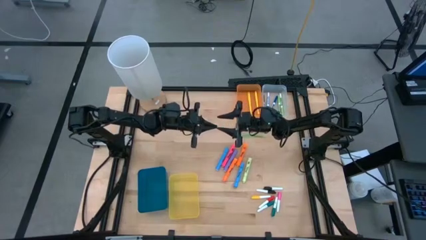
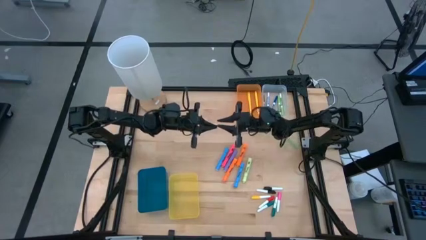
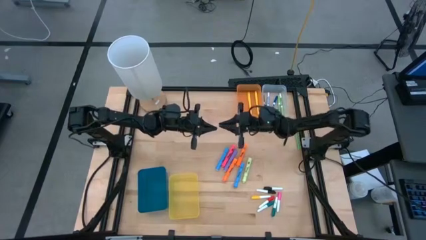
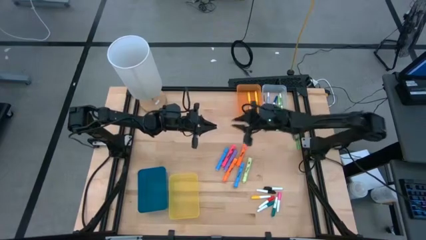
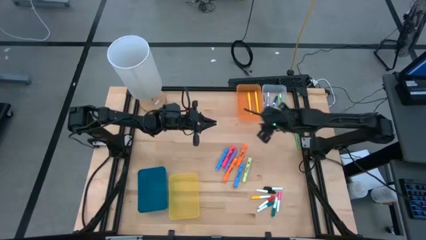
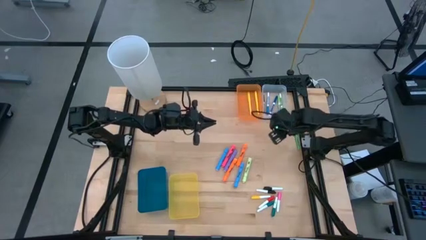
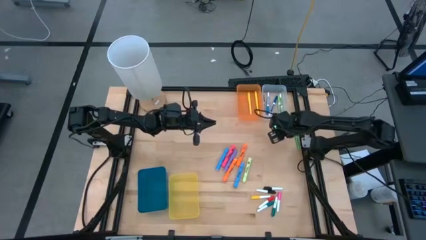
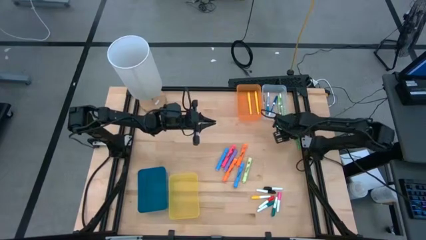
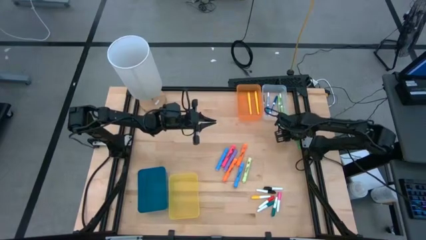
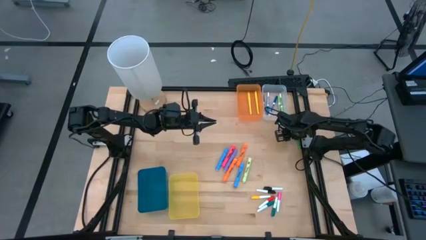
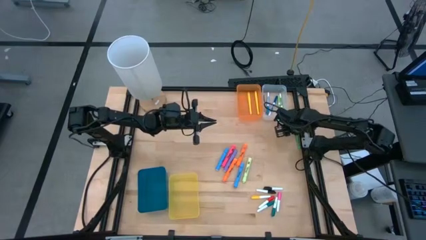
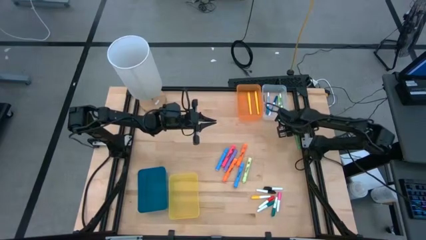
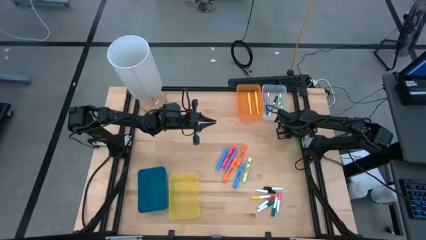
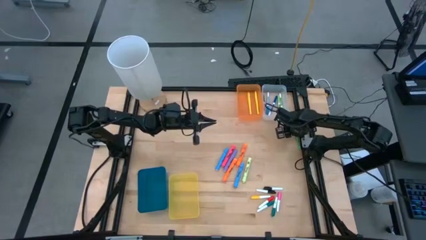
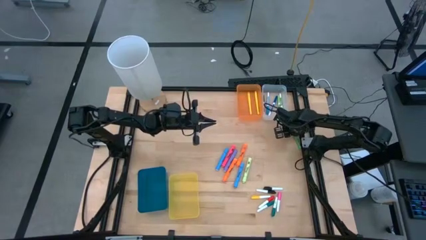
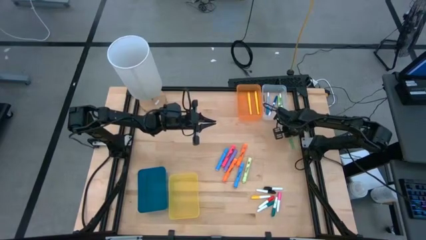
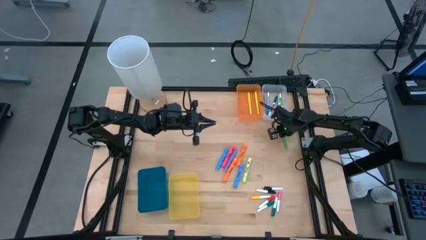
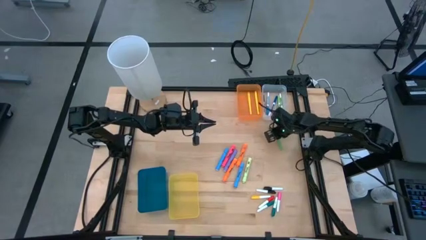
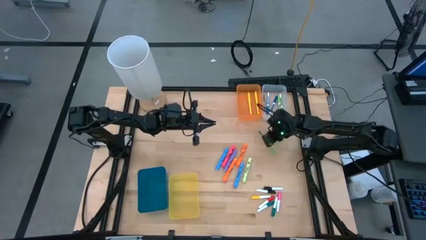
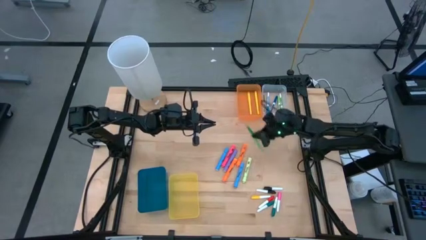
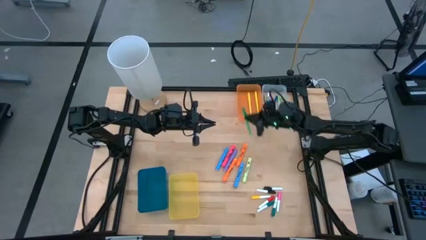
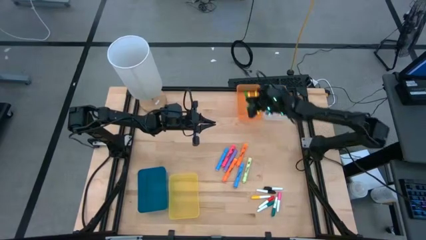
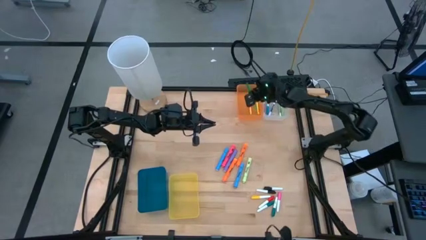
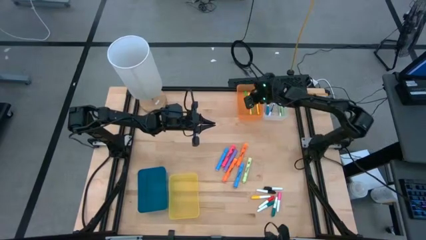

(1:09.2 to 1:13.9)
Task: Pick & Place Markers
Put the green pen into the orange bin

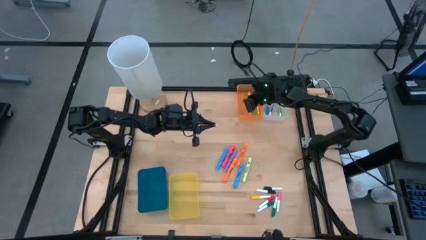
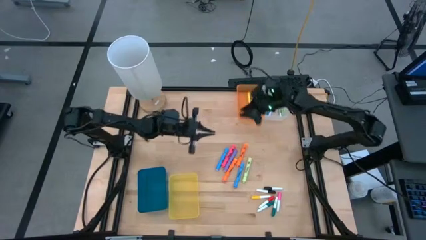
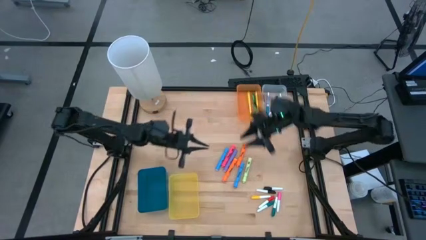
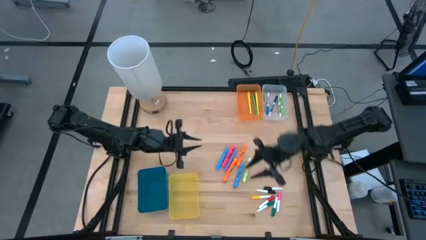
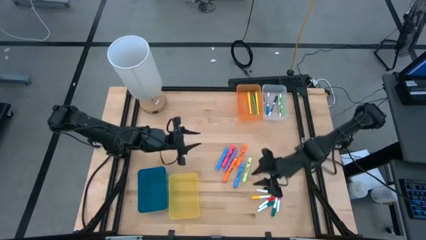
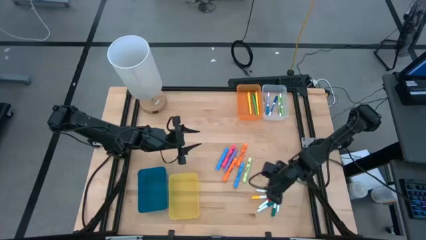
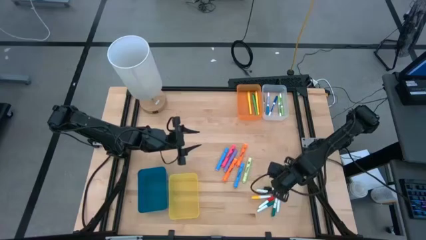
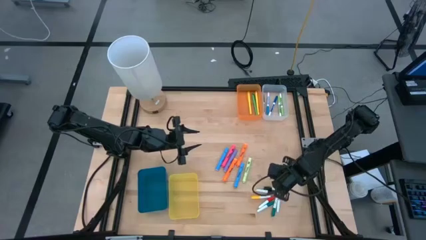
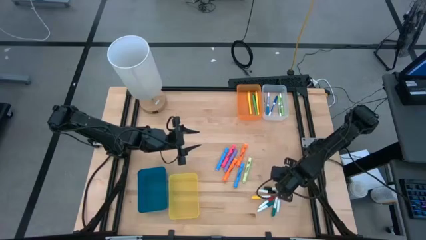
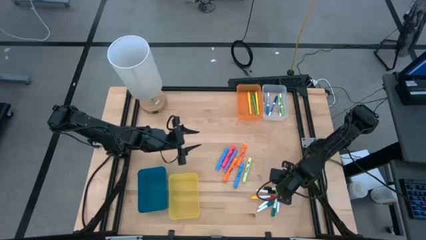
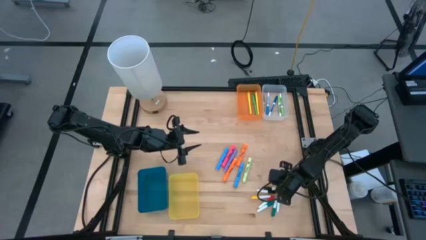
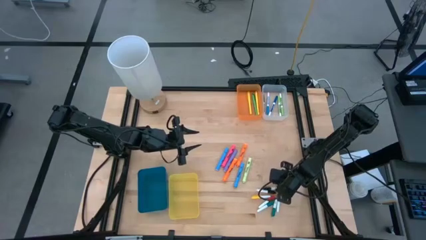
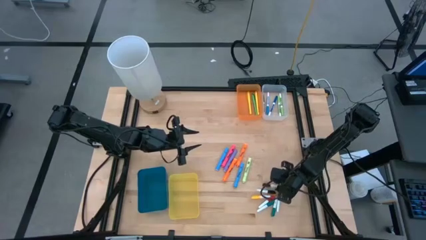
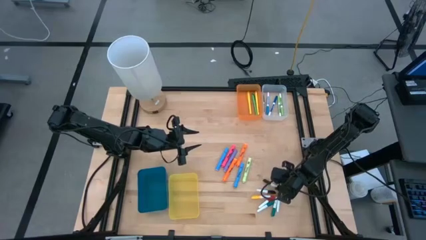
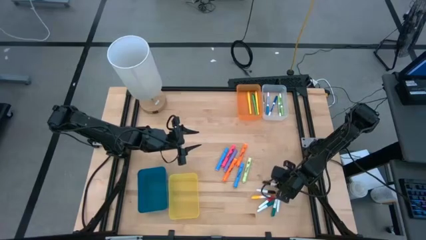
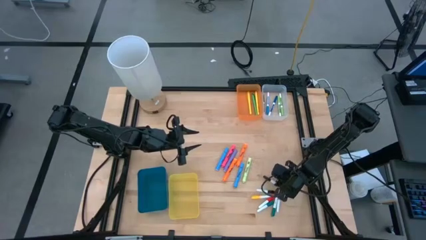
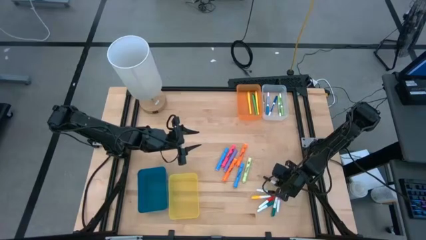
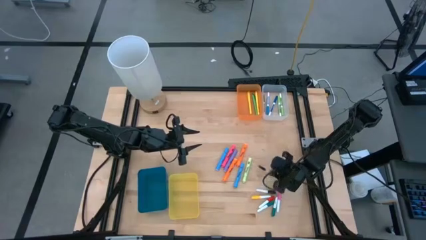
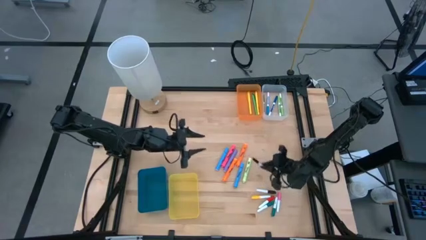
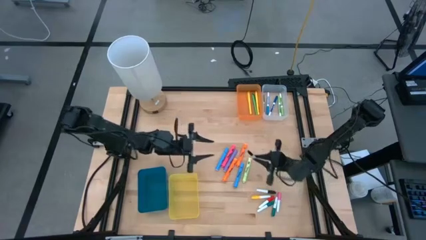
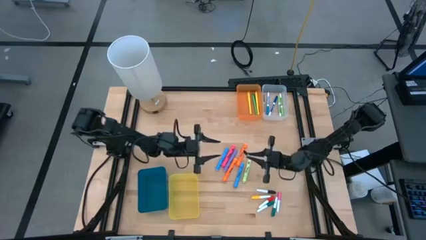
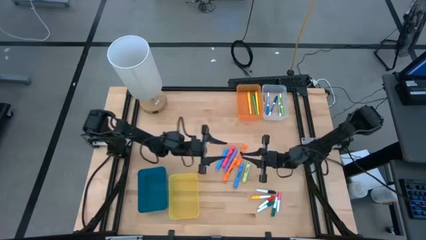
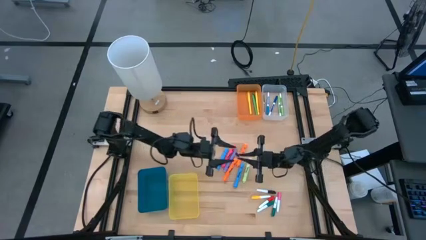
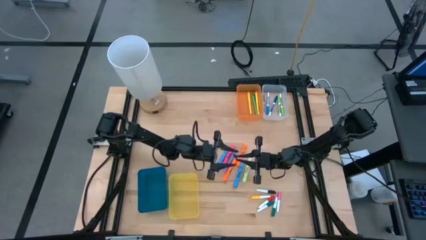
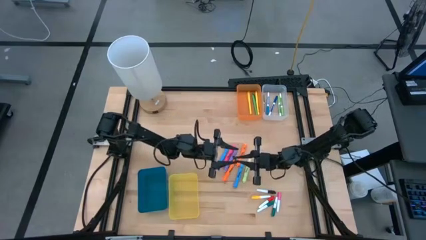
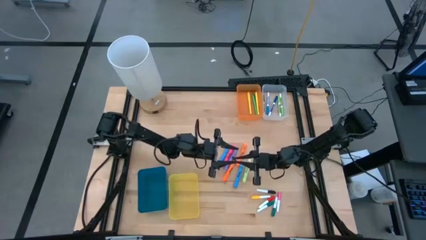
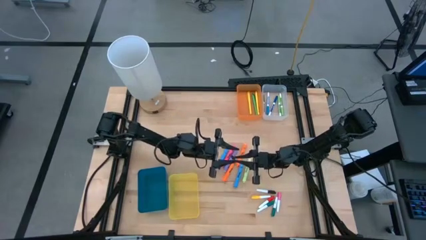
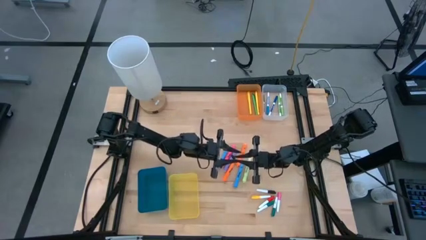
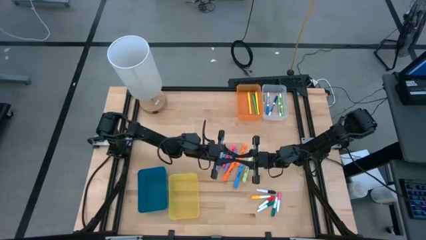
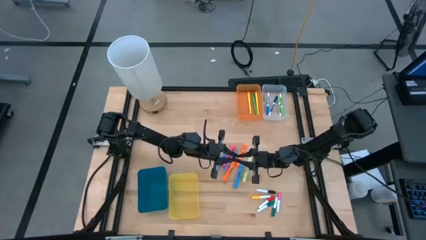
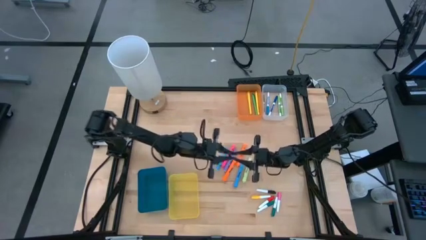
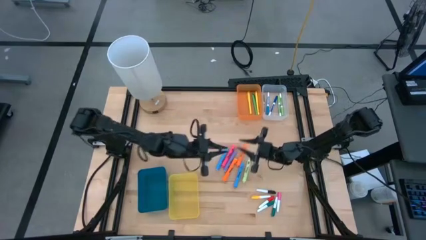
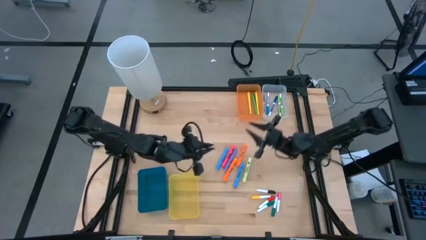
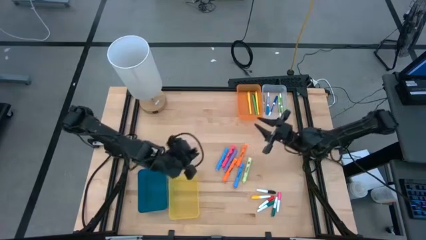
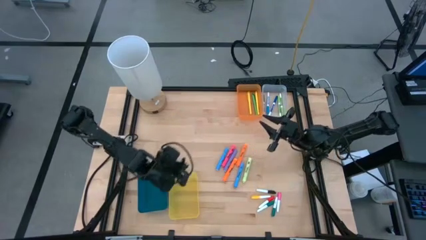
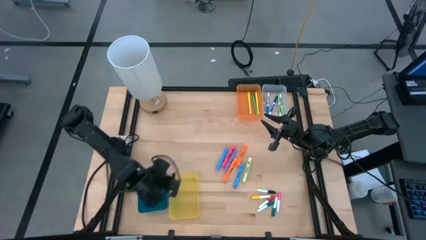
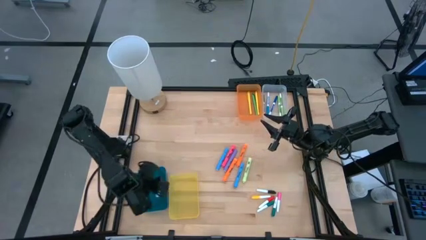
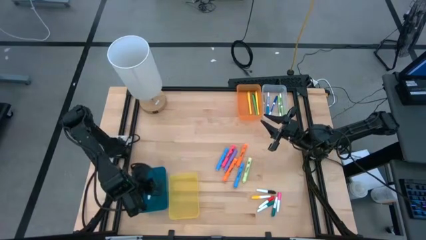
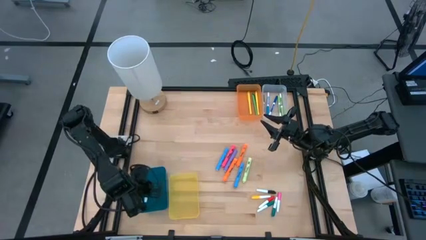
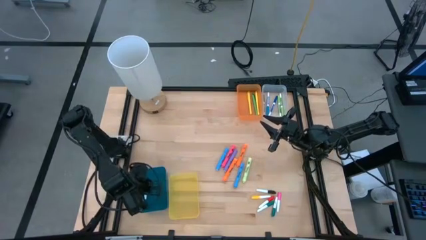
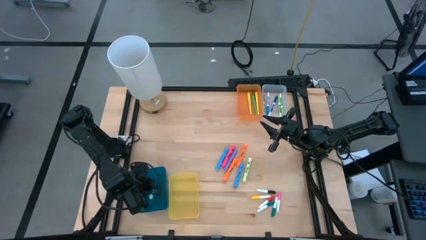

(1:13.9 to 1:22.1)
Put the top white and black highlighter pen into the blue bin
